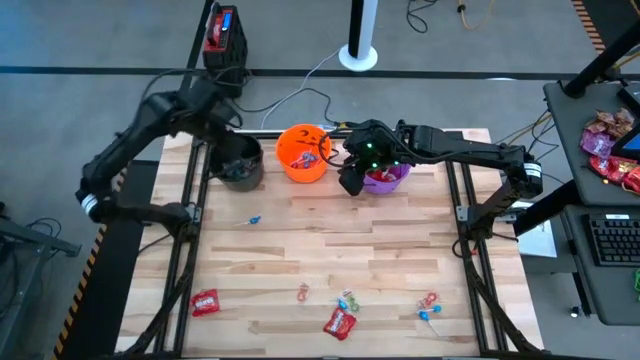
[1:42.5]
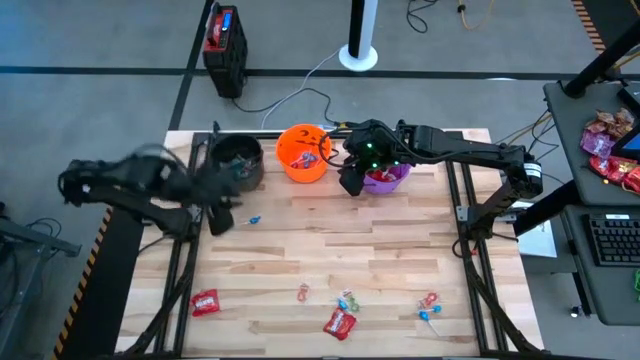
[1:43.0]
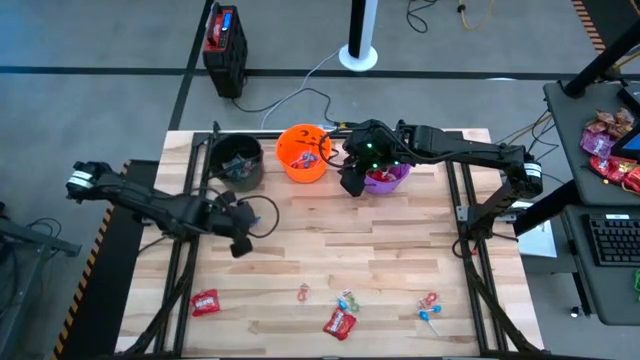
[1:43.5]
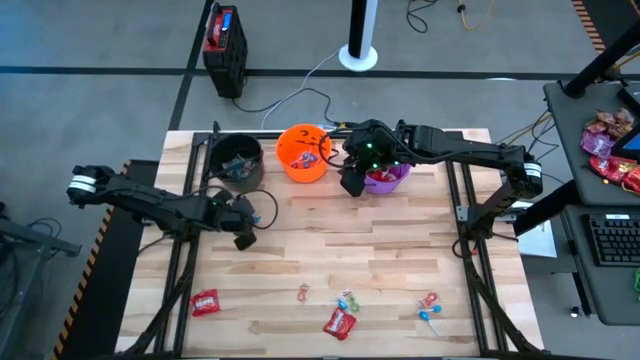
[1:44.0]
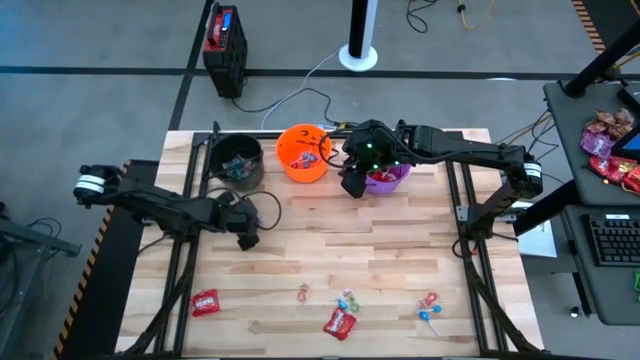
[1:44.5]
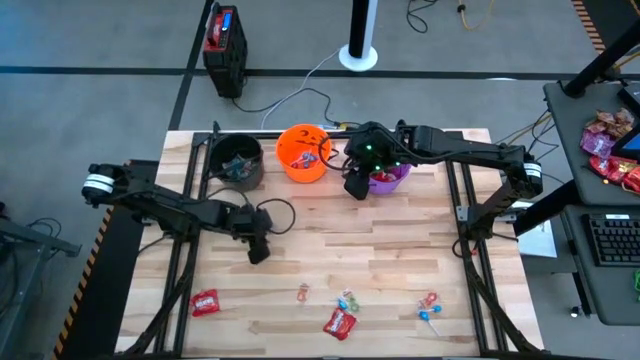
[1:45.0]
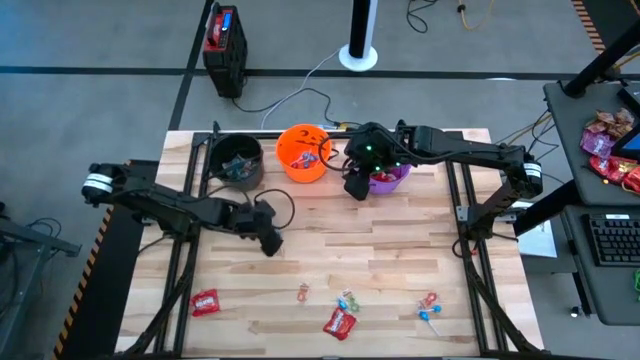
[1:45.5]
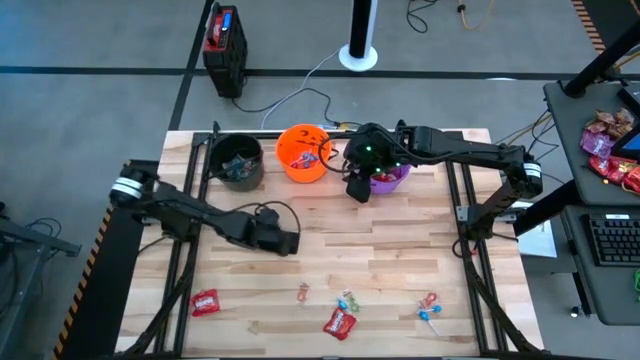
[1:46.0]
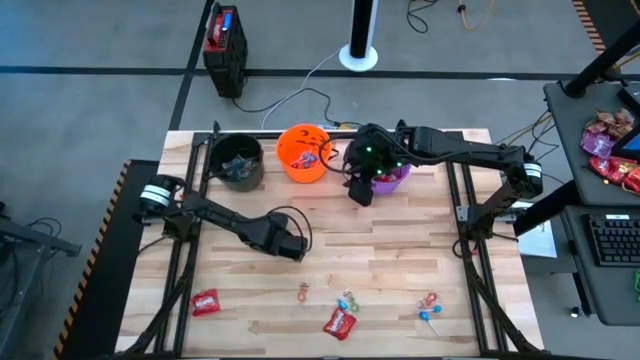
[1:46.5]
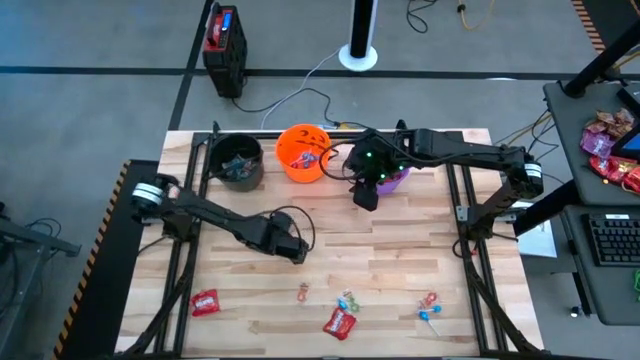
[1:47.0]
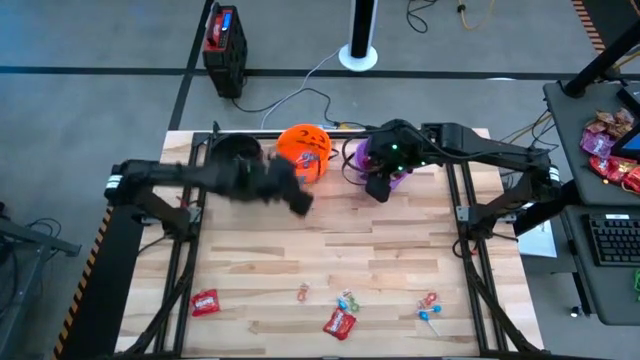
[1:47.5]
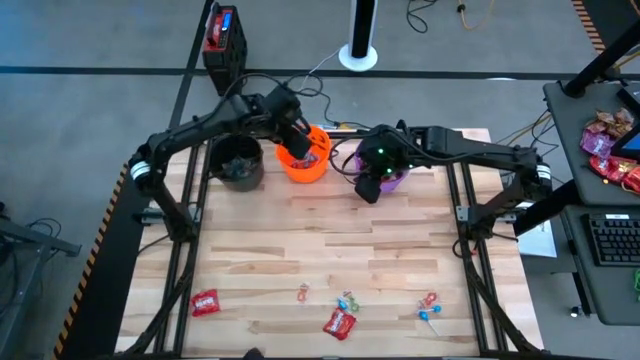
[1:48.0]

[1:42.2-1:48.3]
Task: Sort candy by brand, put in halloween buckets
Put the blue candy into the orange bucket

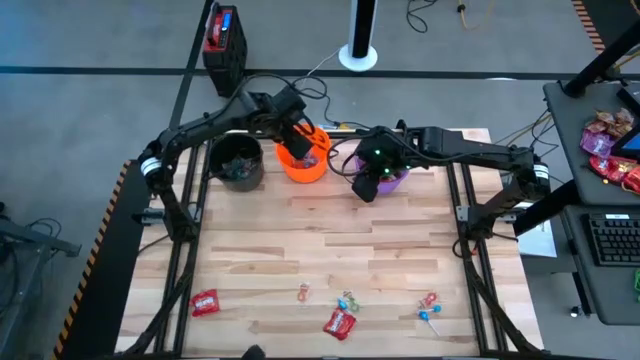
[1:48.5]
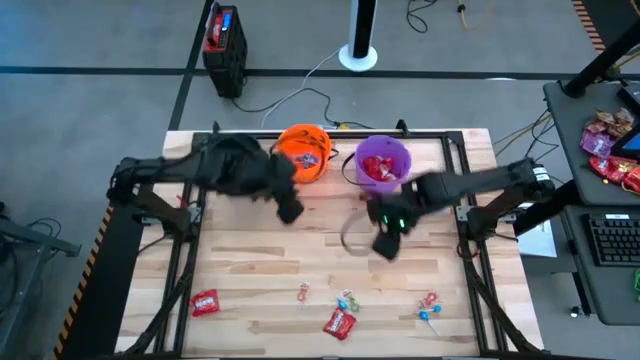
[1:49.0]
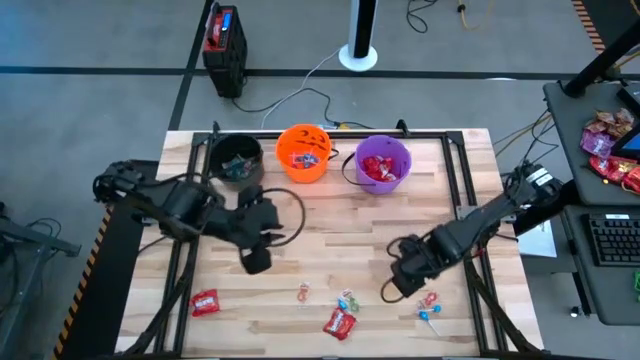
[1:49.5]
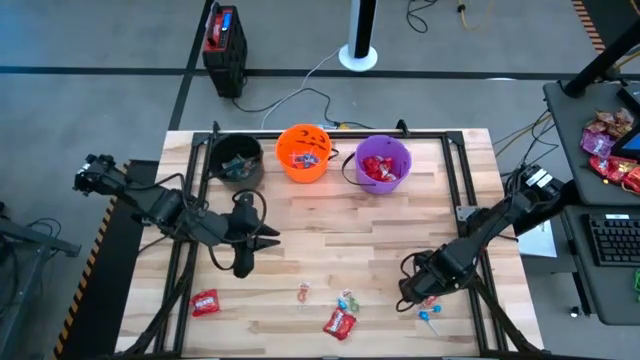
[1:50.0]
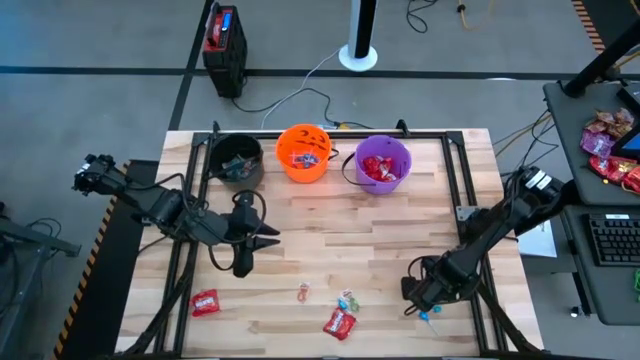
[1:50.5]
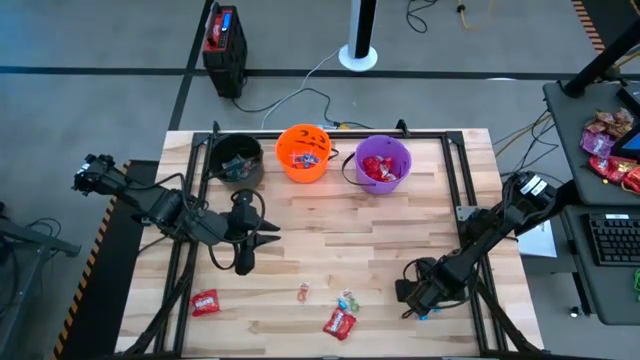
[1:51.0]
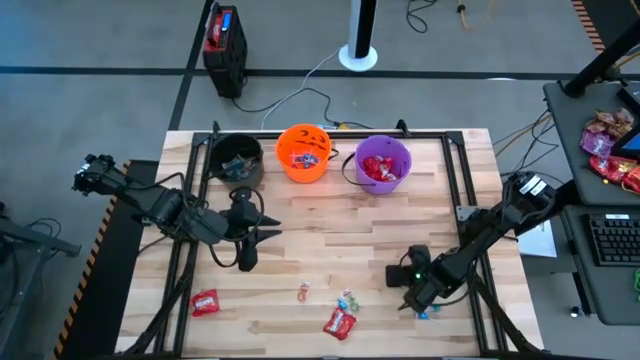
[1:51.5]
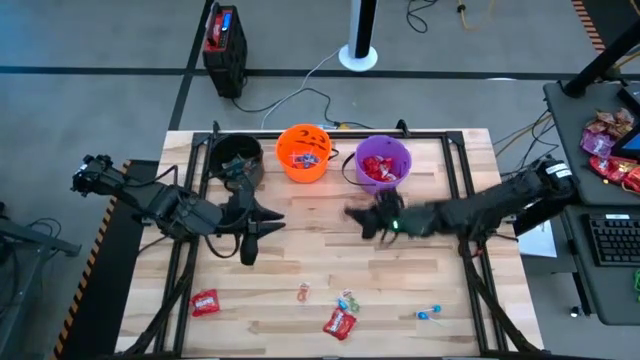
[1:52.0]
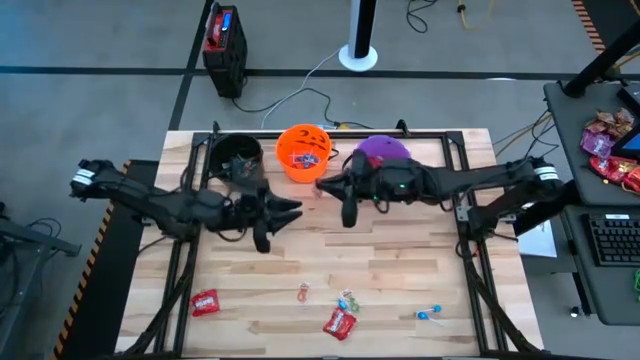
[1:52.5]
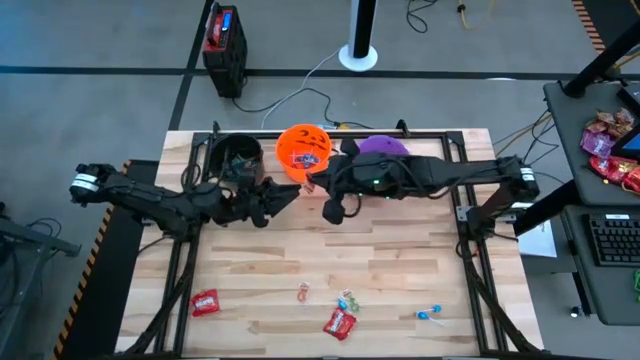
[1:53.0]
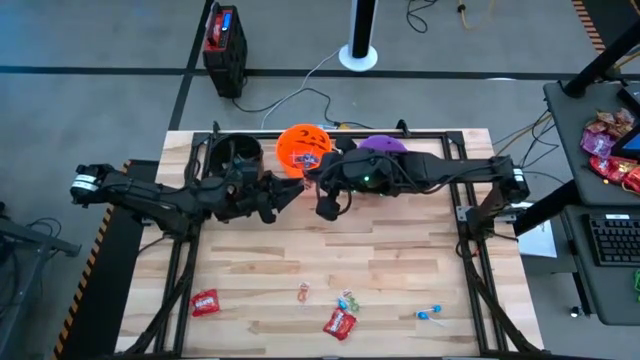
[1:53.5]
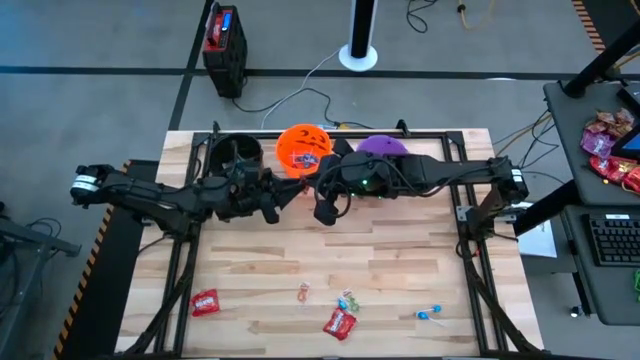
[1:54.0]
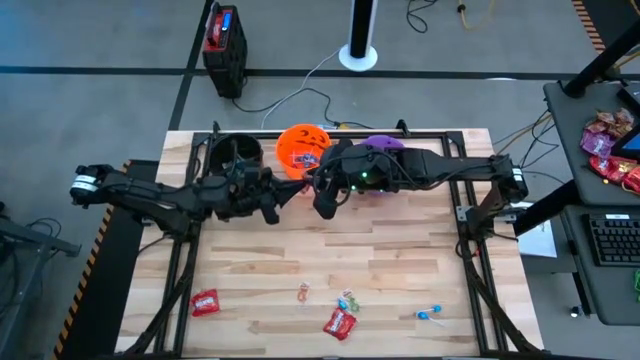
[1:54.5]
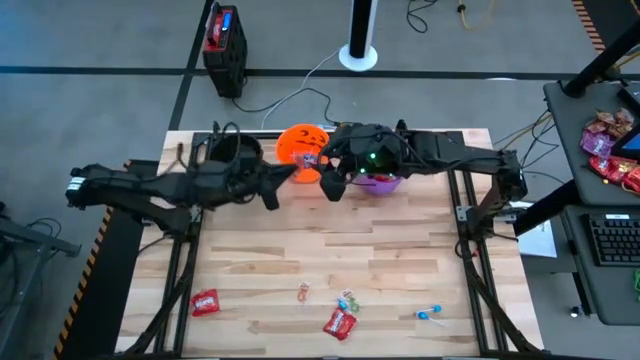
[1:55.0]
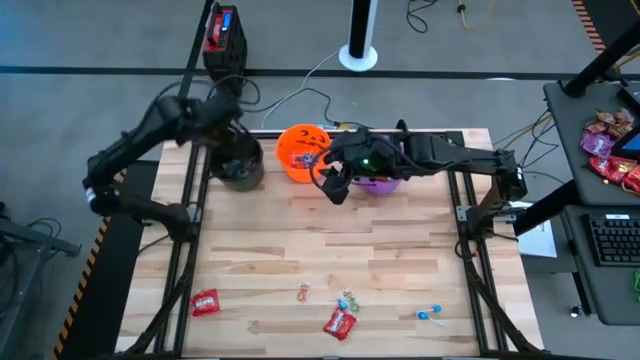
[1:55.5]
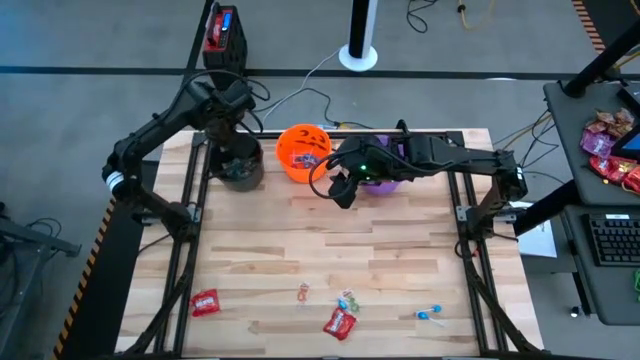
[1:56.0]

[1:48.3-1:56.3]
Put the red gummy into the black bucket

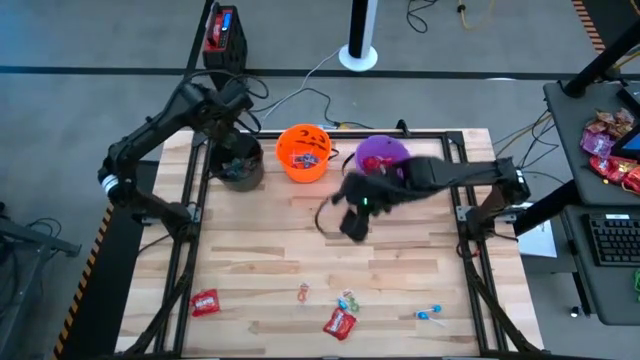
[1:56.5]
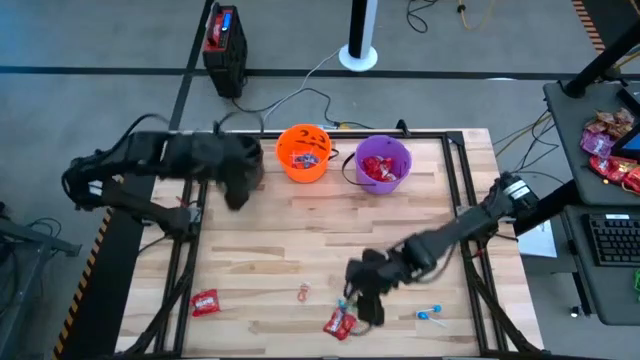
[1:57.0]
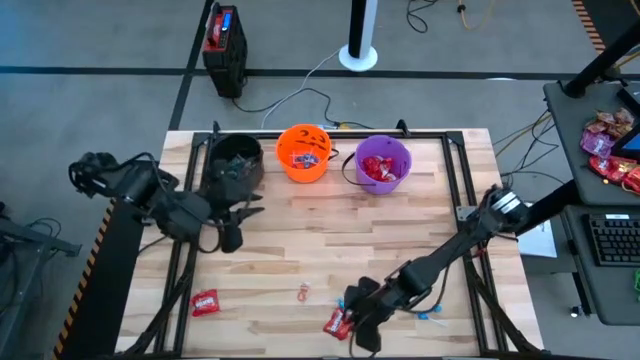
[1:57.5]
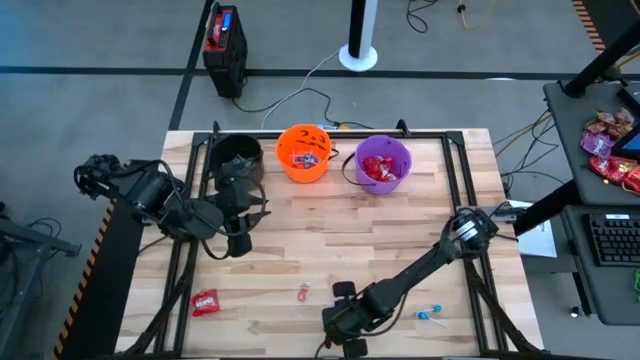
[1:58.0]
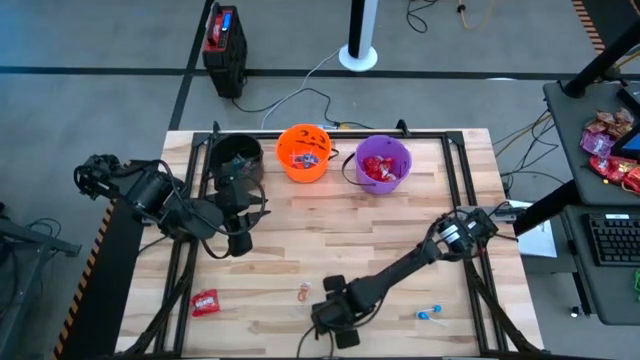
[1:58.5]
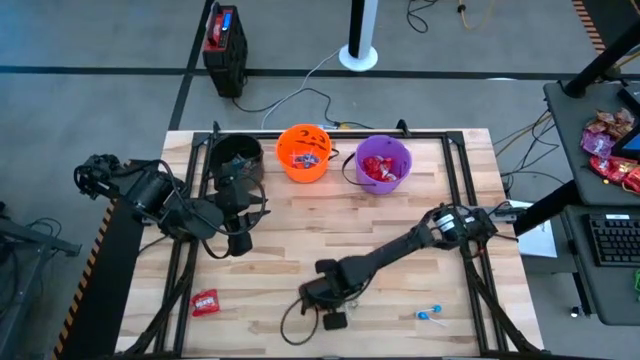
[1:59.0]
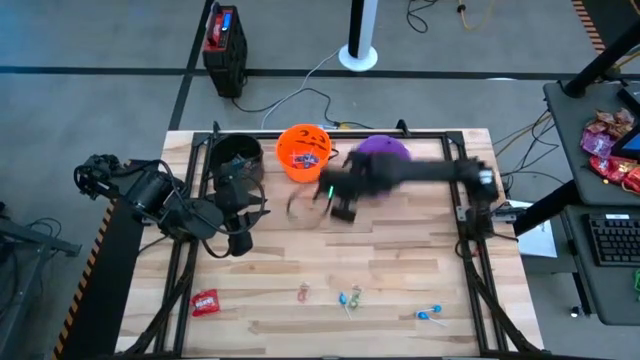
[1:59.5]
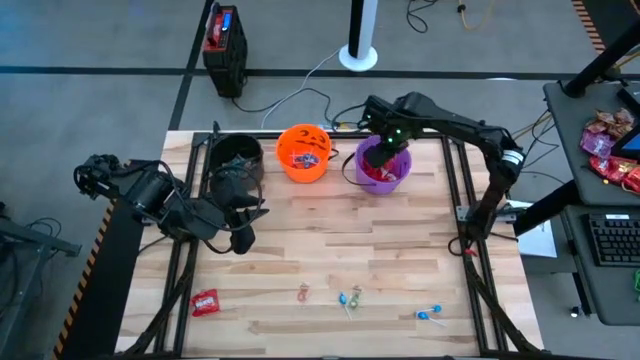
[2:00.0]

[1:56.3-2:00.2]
Put the red candy into the violet bucket

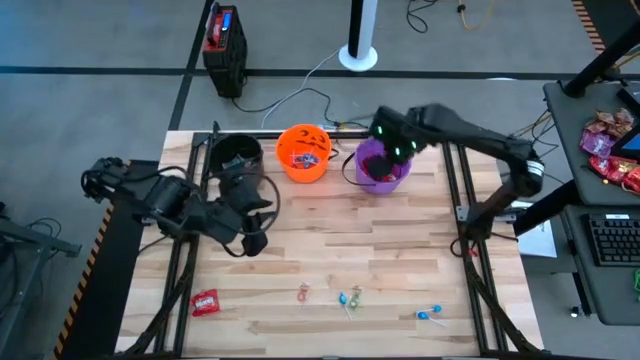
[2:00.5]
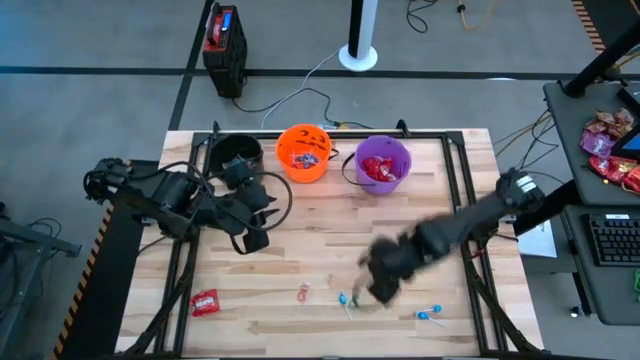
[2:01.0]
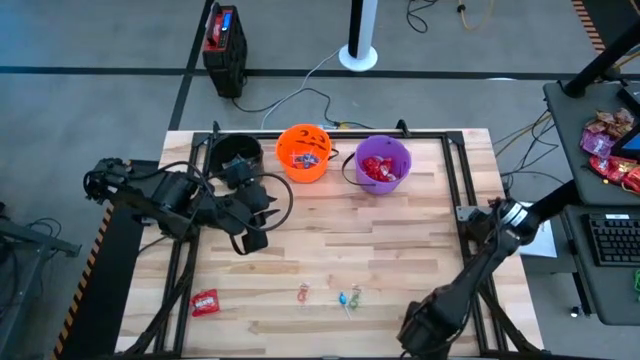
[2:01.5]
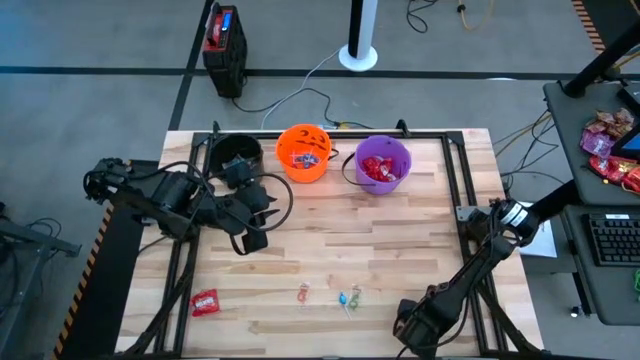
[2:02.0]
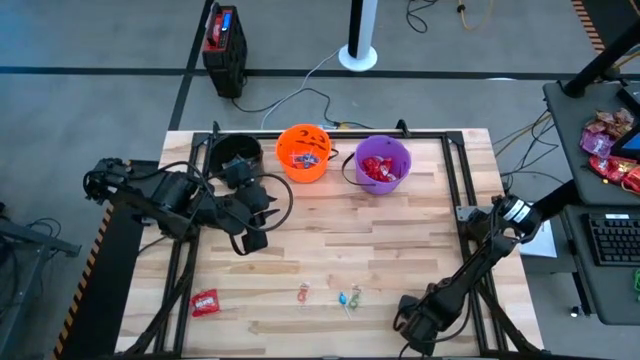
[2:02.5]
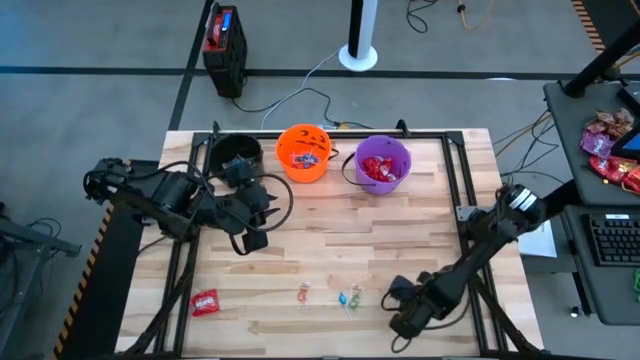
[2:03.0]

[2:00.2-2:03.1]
Put the blue candy into the orange bucket

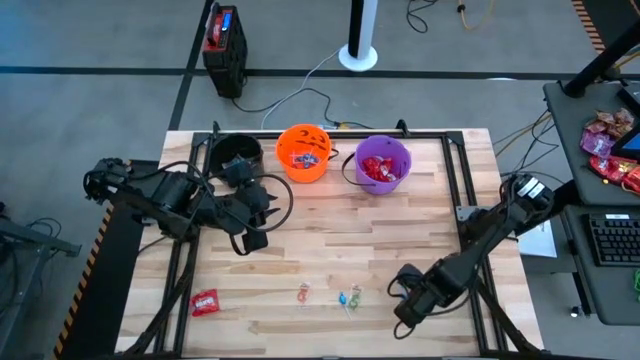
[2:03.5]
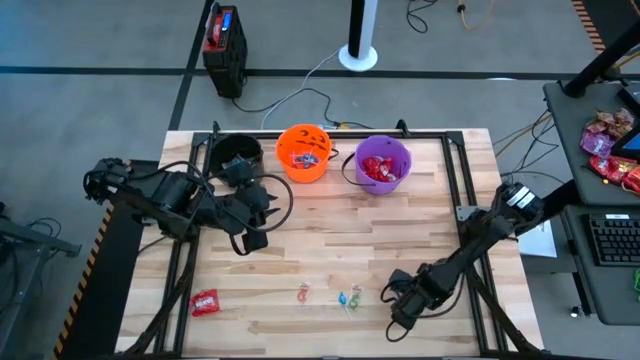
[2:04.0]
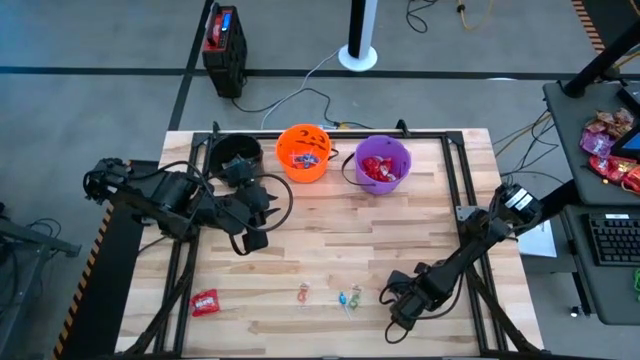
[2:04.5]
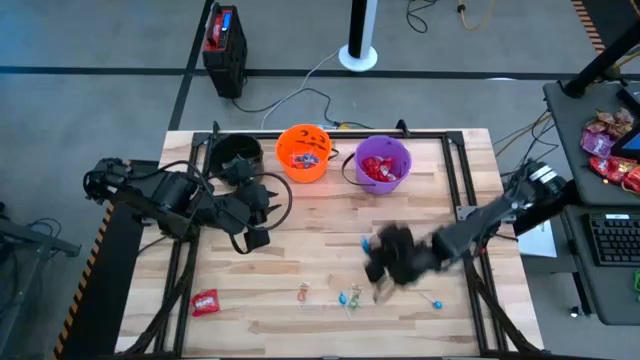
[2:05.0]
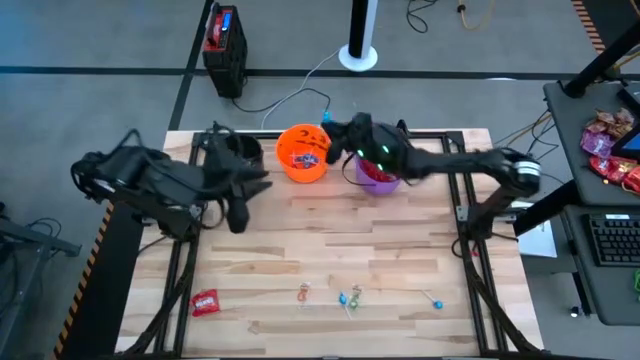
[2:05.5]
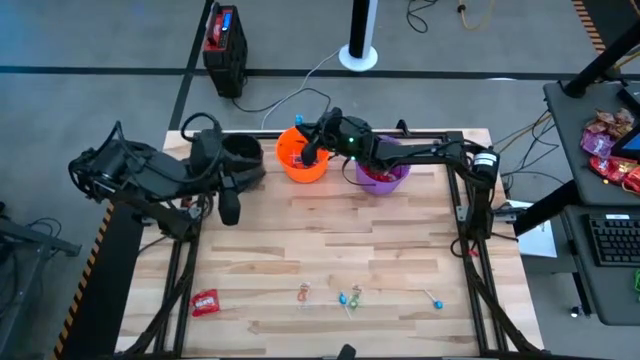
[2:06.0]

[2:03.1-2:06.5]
Put the blue candy into the orange bucket
